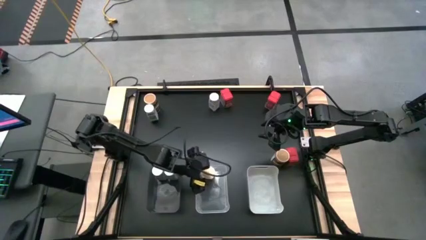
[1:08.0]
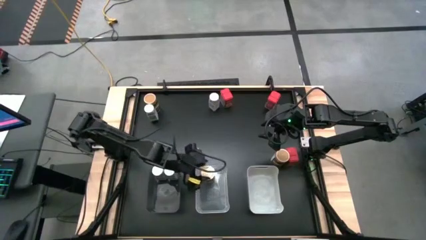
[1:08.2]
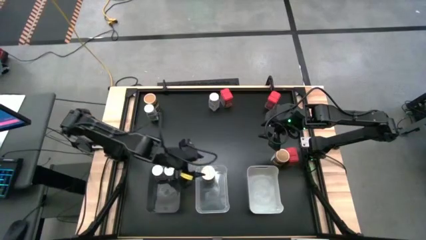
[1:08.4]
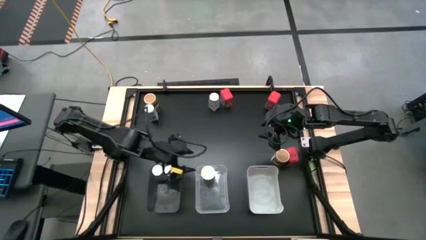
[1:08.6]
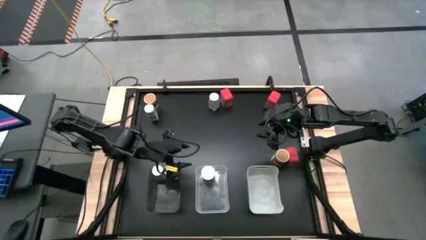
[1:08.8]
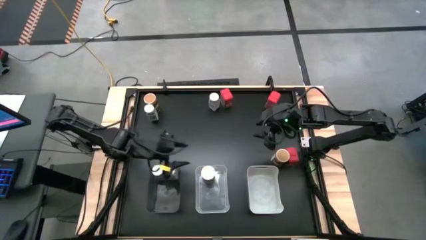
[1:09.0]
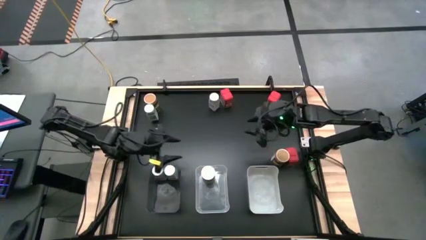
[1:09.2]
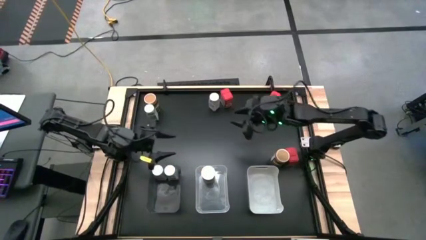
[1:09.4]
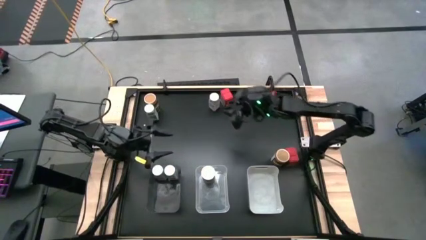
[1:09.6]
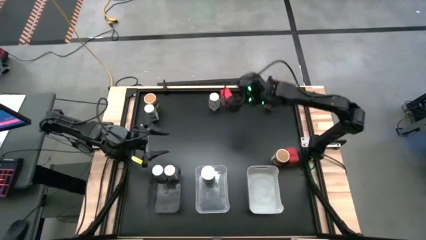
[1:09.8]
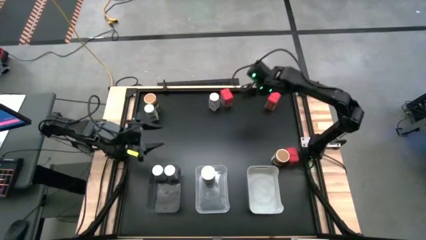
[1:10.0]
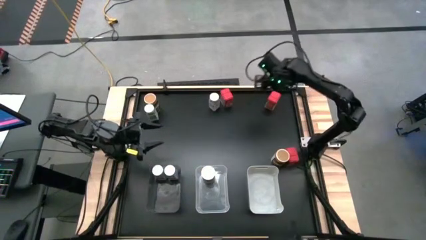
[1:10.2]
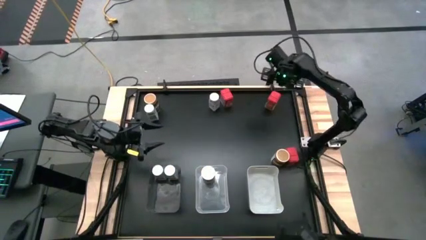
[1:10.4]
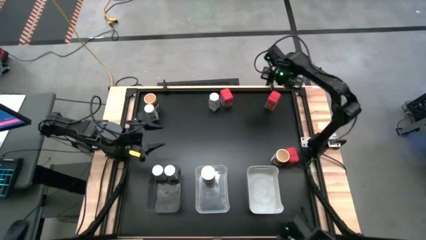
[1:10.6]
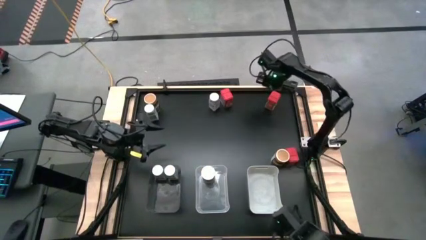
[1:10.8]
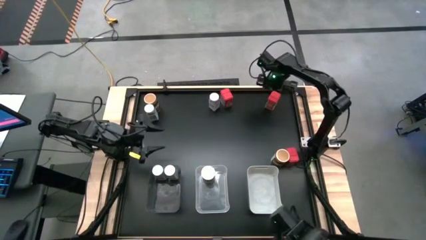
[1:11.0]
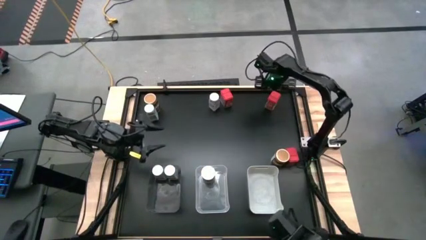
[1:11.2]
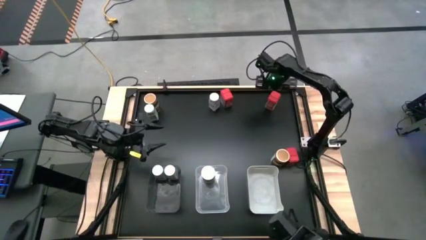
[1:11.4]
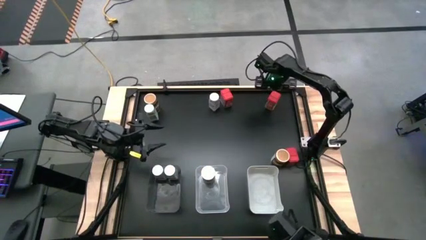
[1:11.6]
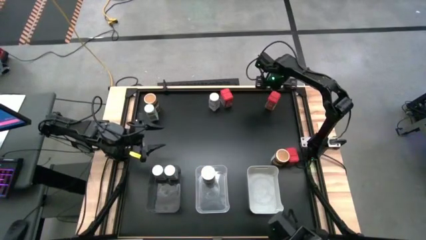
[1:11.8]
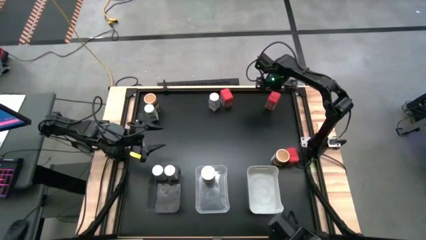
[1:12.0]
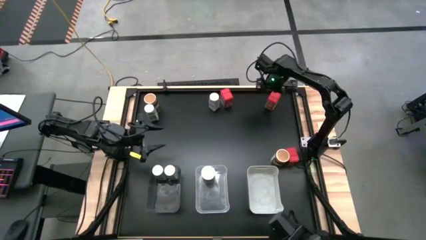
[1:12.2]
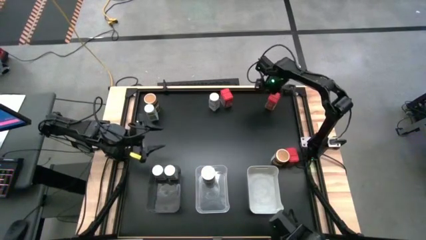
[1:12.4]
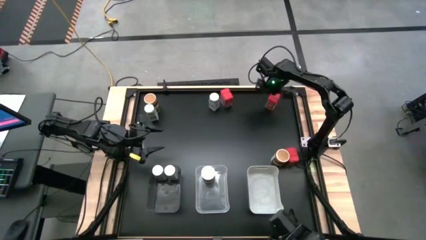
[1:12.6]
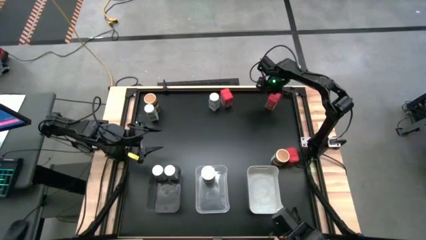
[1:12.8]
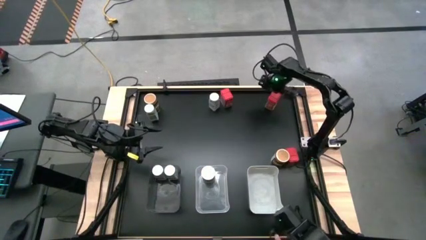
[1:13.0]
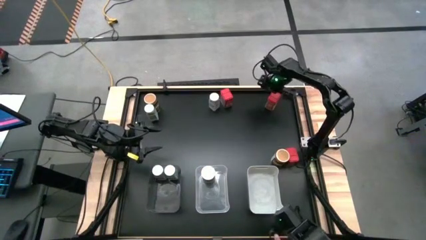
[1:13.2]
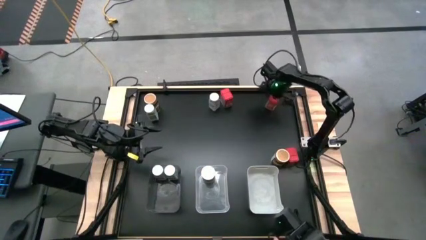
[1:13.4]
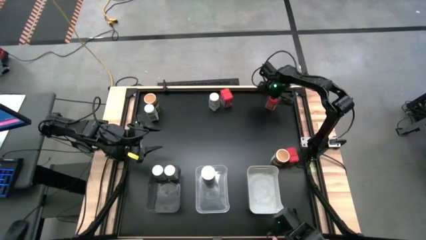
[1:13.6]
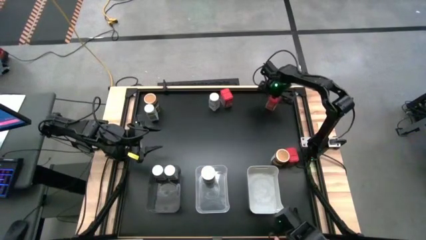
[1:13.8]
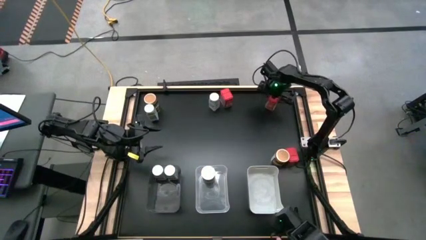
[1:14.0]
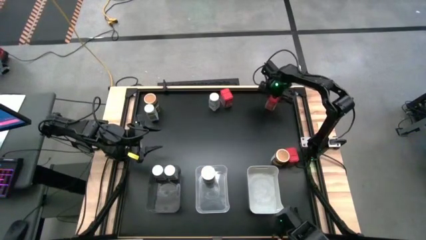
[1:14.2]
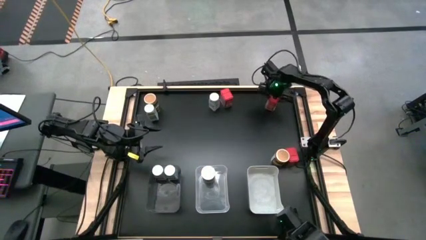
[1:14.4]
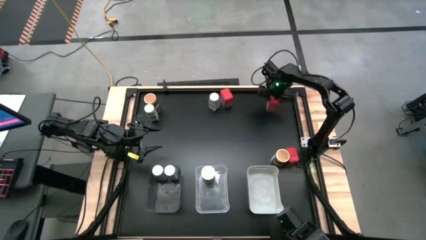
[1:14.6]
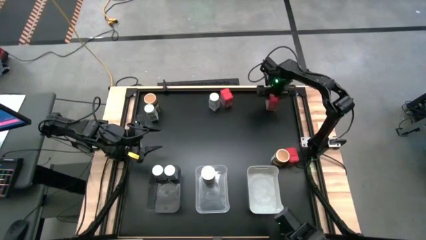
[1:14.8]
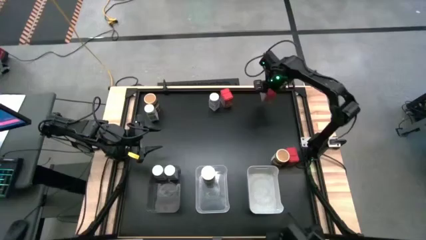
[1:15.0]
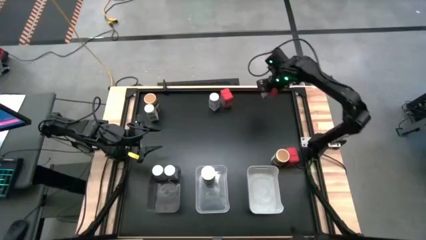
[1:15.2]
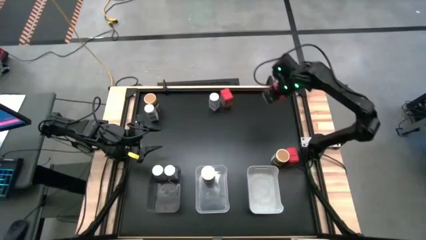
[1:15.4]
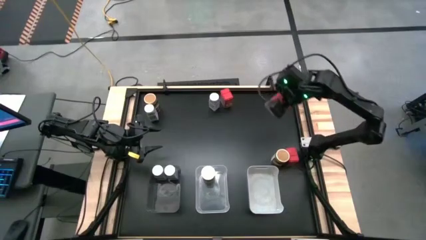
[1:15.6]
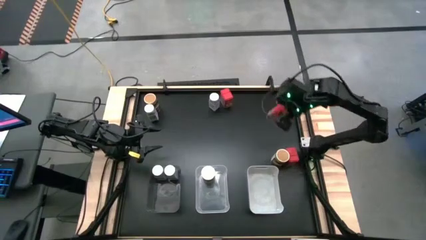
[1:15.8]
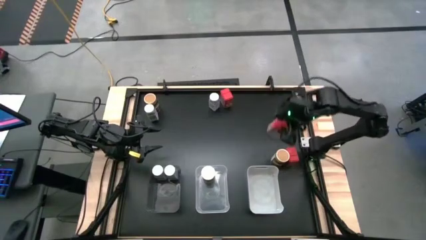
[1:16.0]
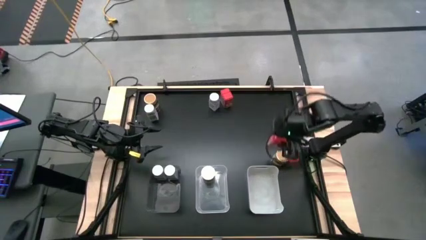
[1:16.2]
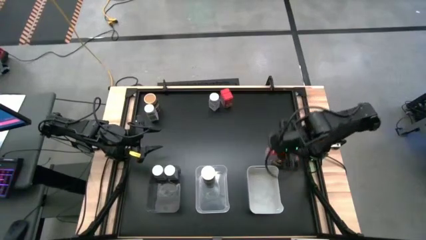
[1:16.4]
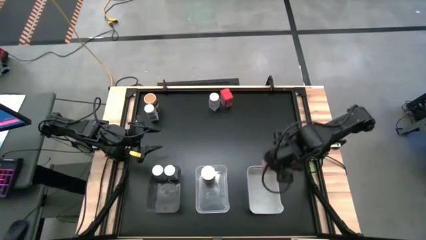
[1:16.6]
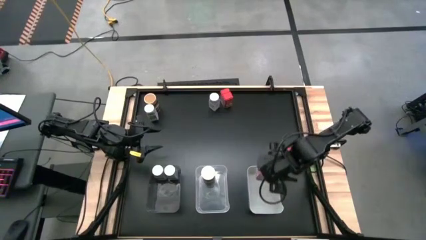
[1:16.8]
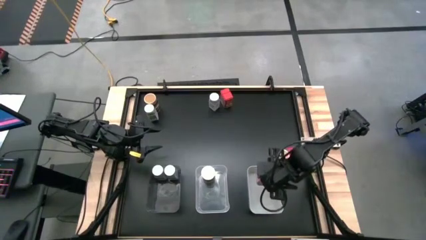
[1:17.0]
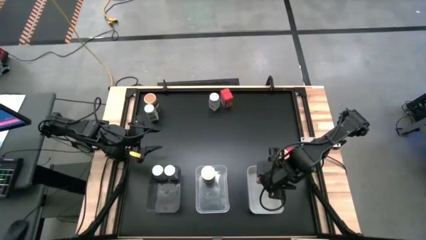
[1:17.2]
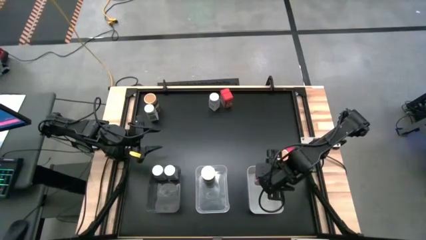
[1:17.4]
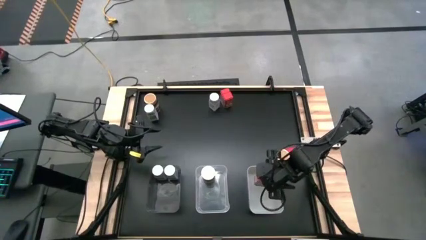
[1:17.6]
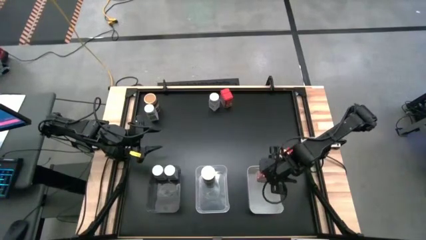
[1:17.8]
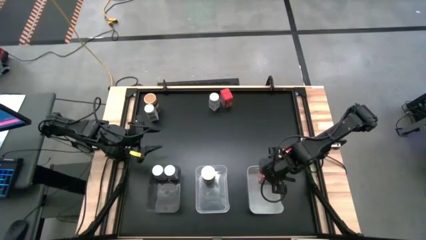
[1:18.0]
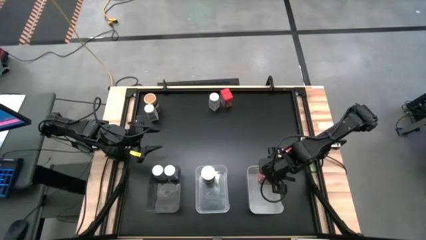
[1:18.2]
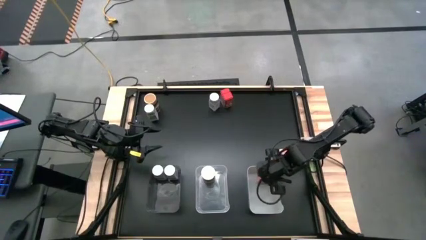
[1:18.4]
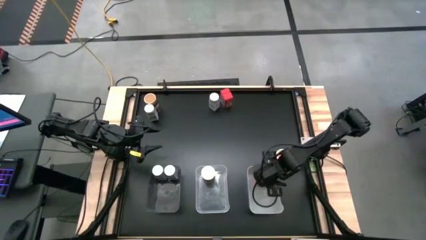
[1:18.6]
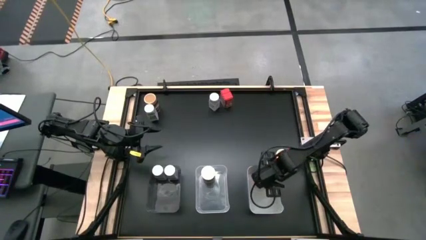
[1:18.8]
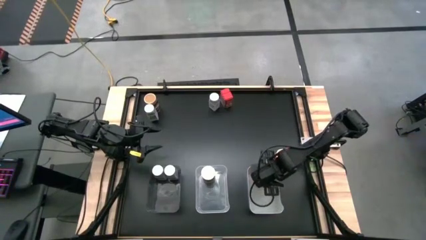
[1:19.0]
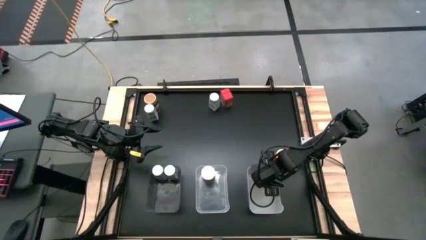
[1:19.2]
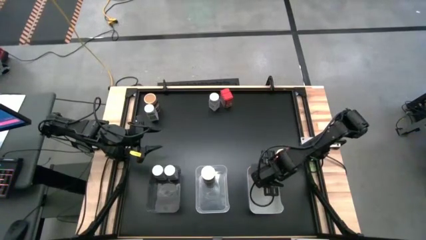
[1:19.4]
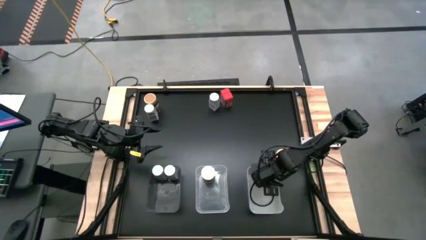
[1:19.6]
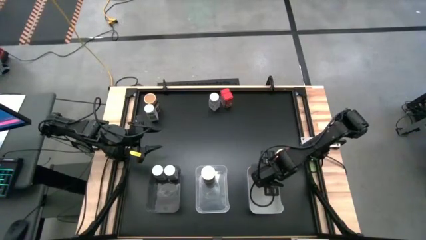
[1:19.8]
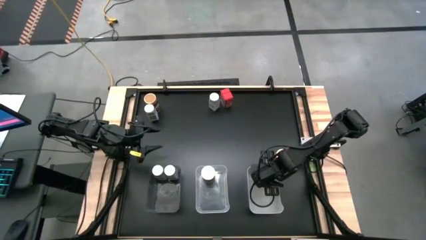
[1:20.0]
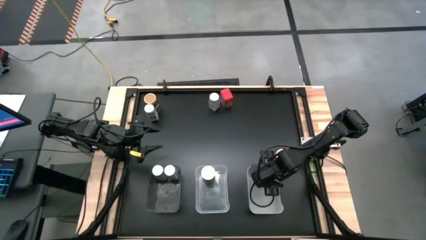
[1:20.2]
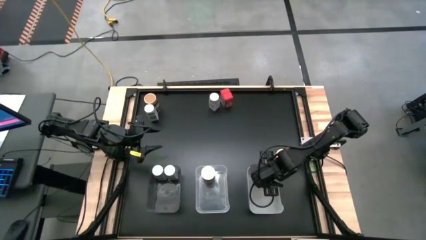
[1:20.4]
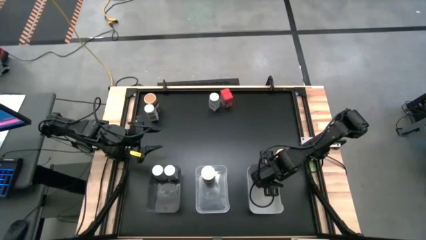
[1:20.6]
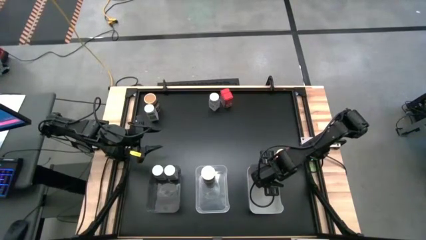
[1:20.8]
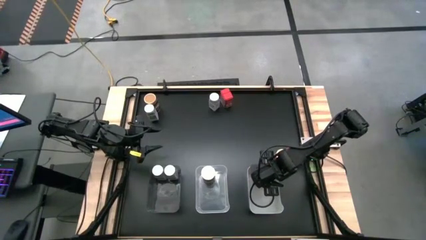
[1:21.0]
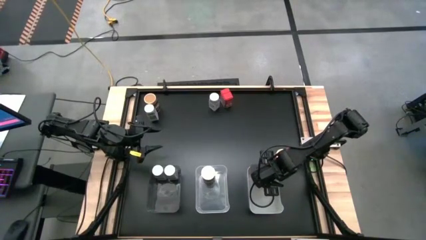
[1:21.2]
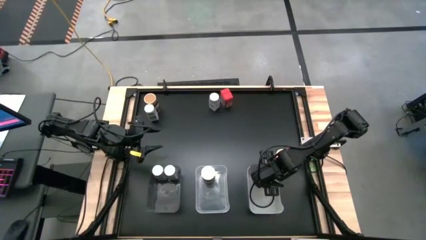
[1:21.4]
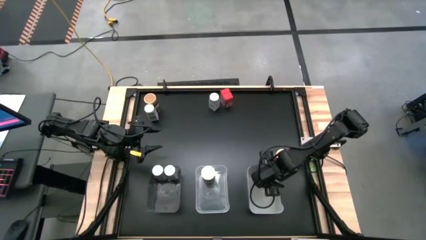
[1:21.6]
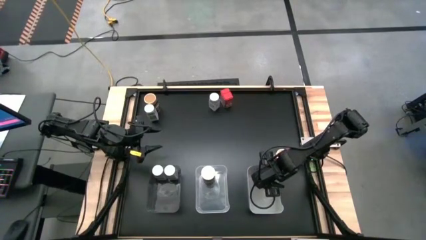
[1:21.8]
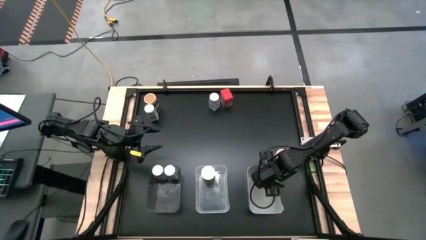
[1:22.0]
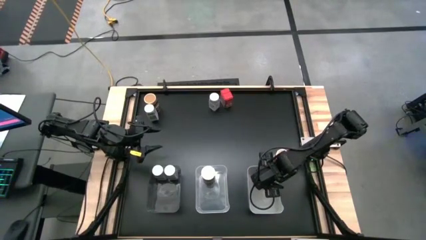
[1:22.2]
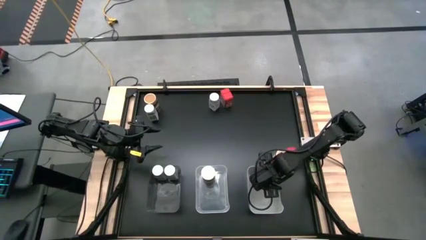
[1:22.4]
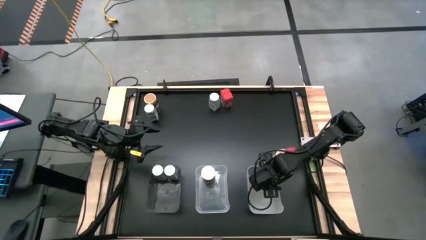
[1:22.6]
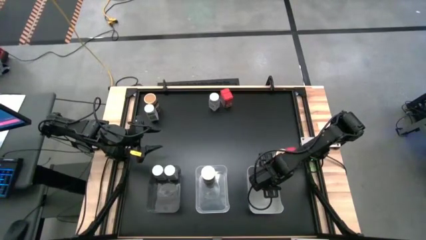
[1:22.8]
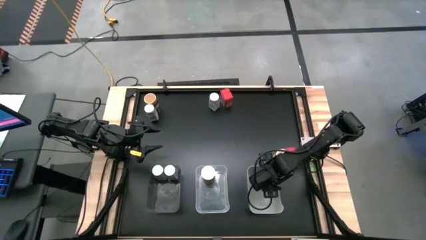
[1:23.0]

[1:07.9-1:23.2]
Task: Sort spices by type
Put the top right red seasoning can into the white bin

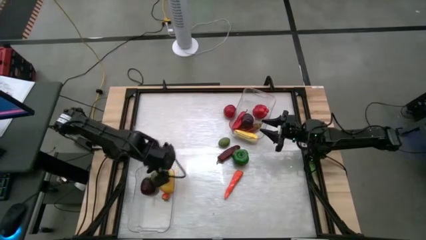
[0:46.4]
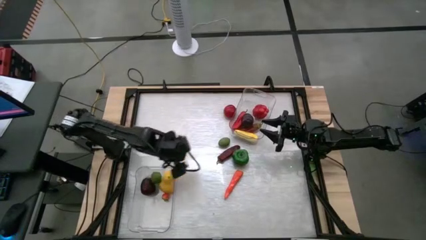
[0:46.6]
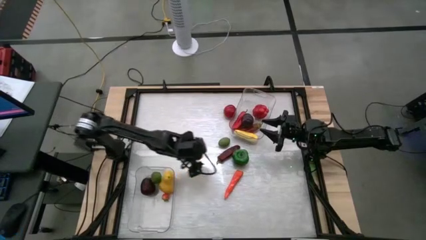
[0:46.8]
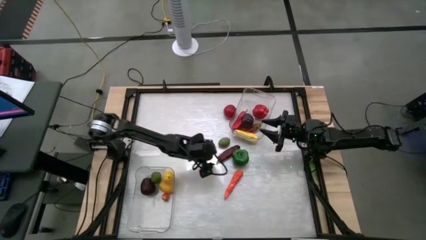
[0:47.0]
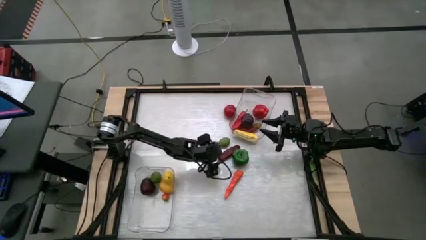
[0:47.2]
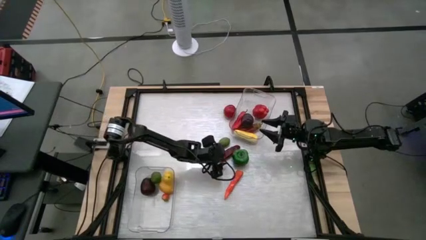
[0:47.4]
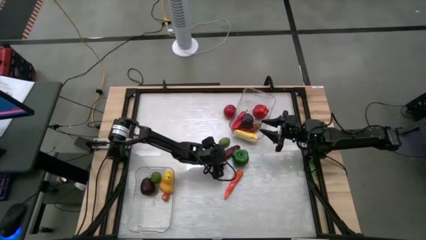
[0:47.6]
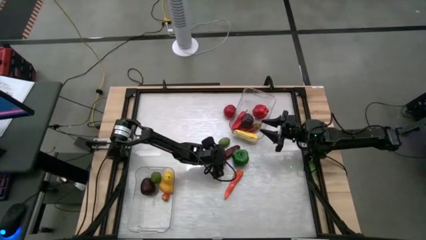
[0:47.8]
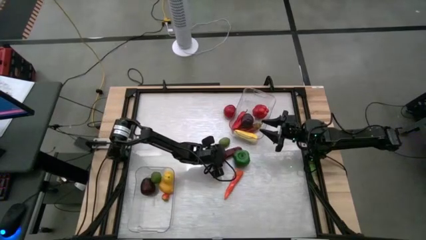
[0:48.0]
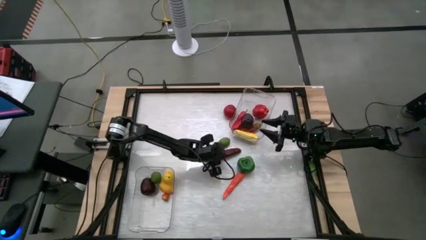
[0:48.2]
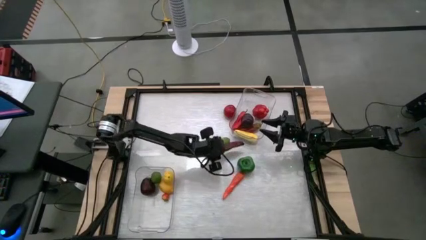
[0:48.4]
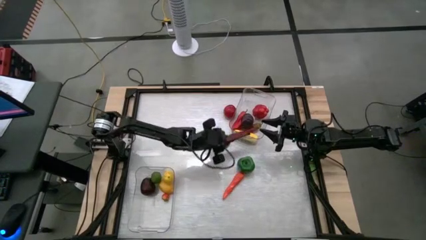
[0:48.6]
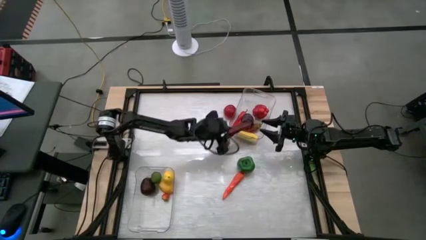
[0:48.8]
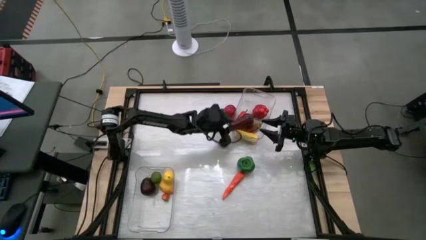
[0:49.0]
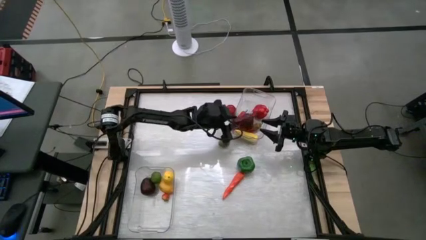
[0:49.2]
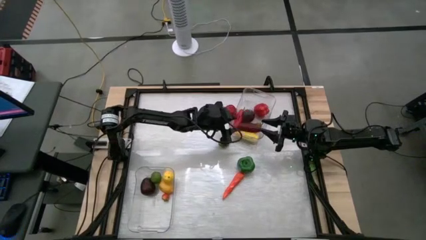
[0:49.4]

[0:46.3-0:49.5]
Task: Sort produce into baskets
Put the dark red chili pepper into the top transparent bin
